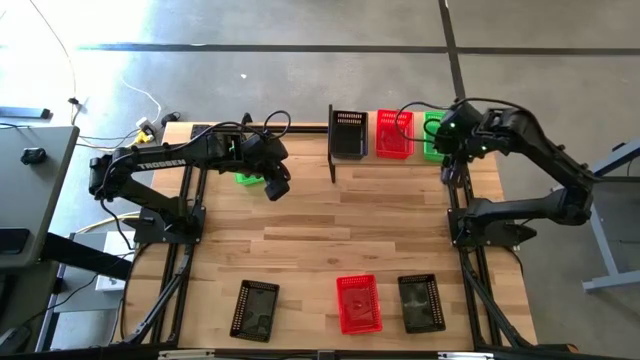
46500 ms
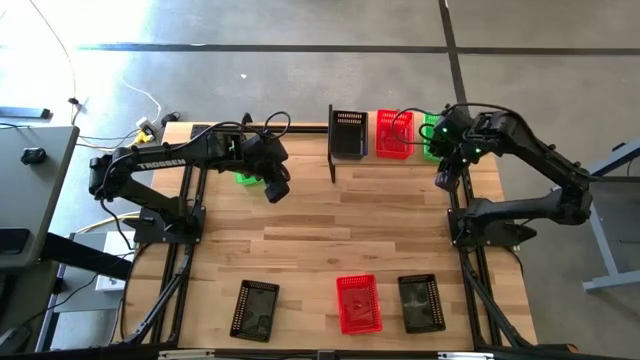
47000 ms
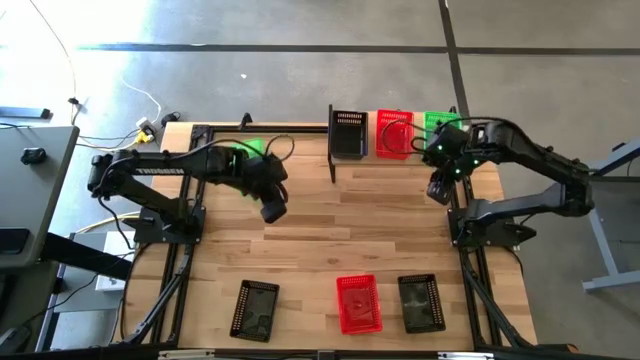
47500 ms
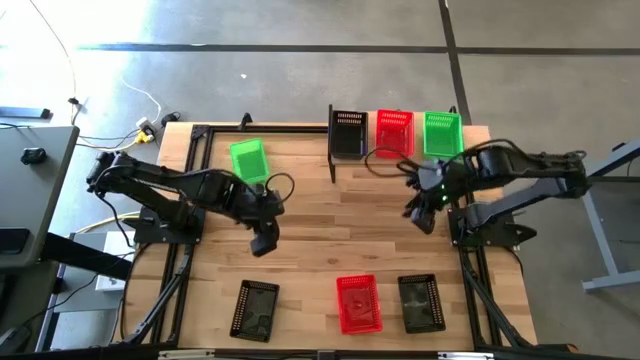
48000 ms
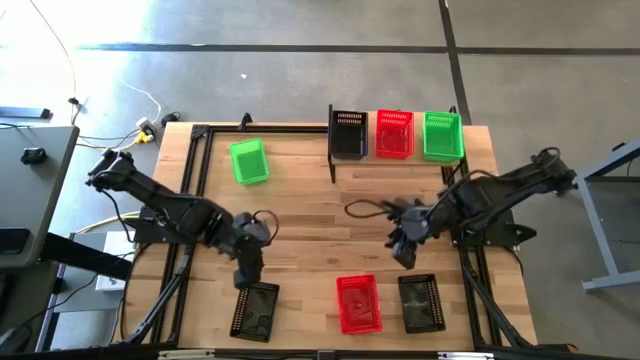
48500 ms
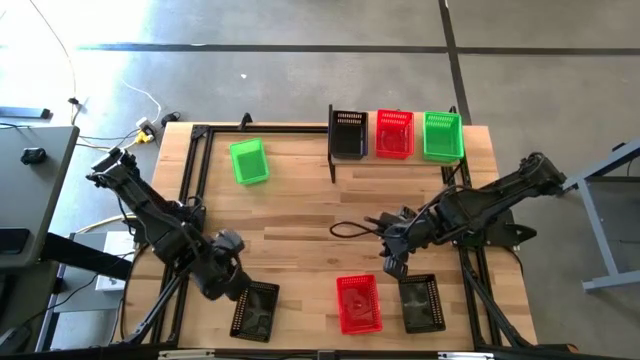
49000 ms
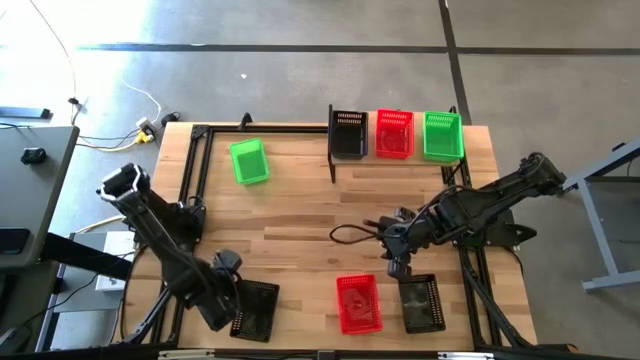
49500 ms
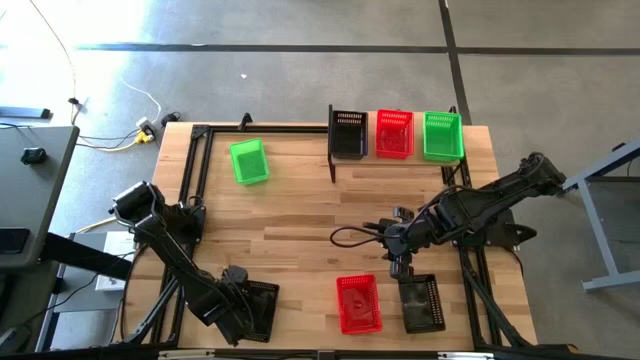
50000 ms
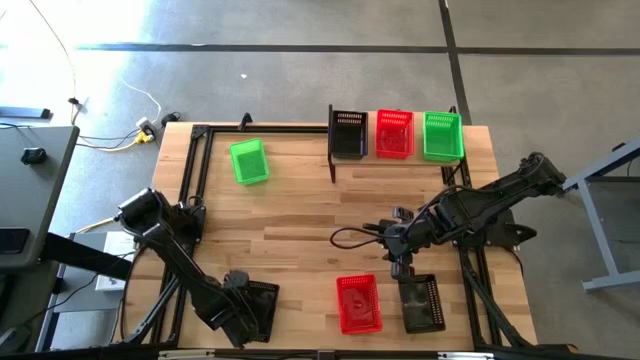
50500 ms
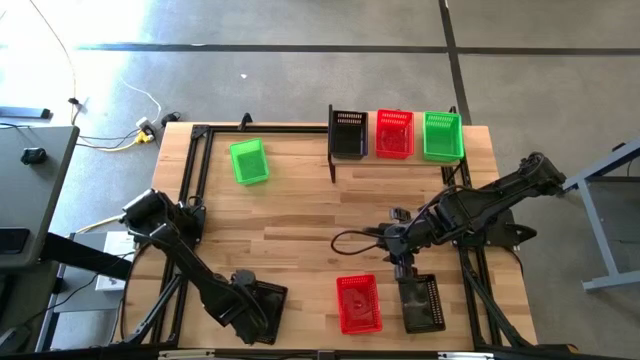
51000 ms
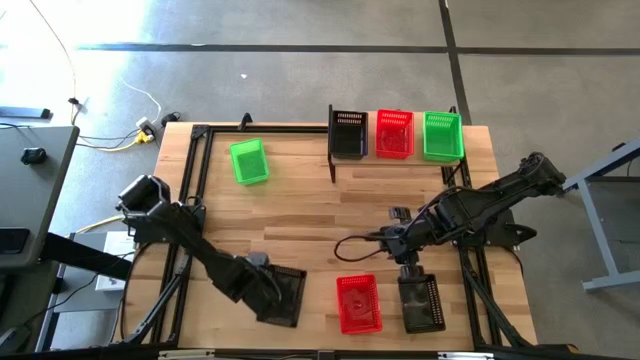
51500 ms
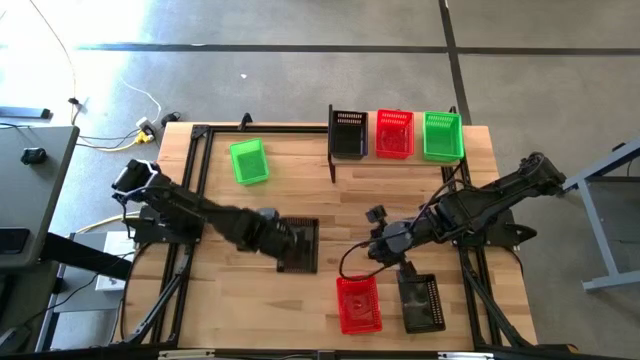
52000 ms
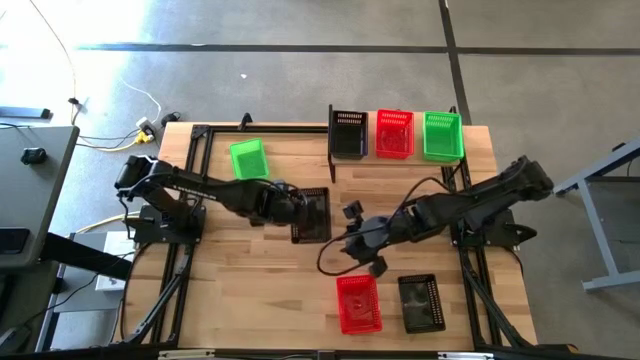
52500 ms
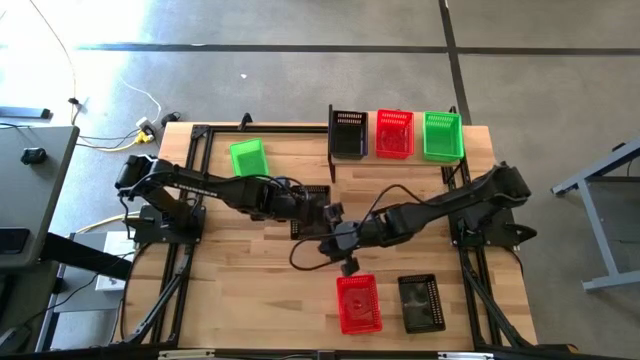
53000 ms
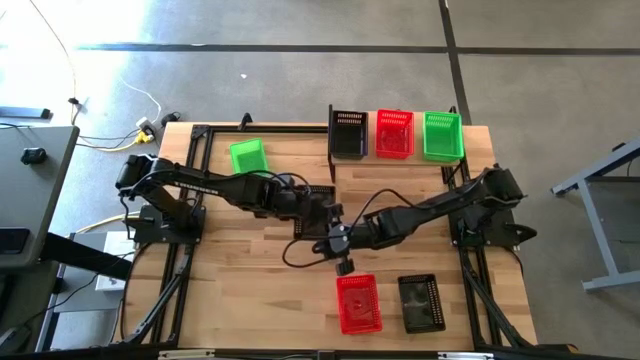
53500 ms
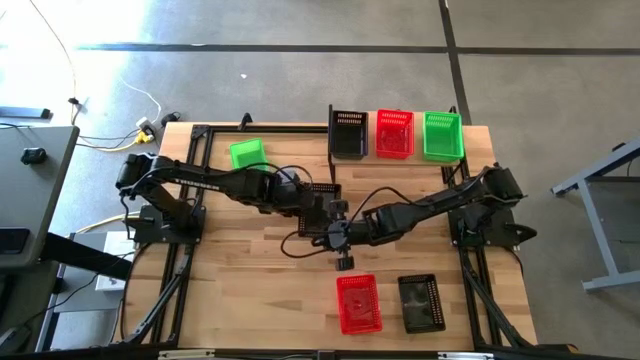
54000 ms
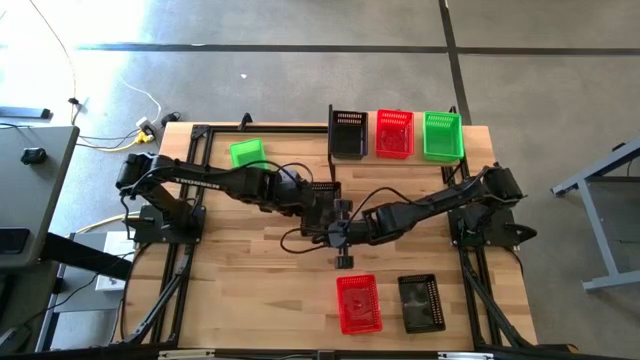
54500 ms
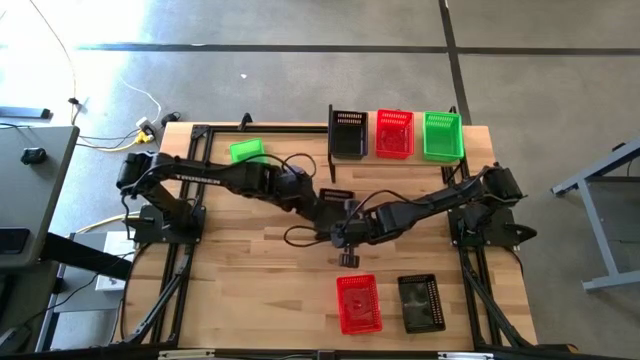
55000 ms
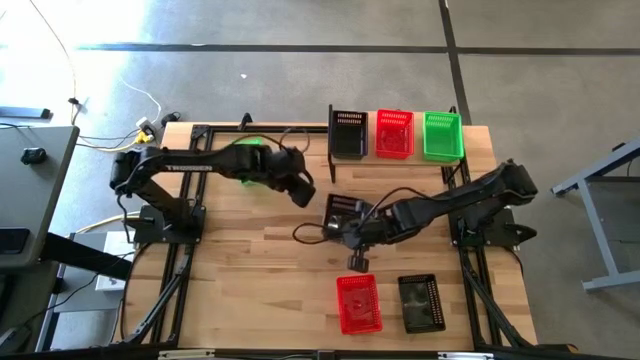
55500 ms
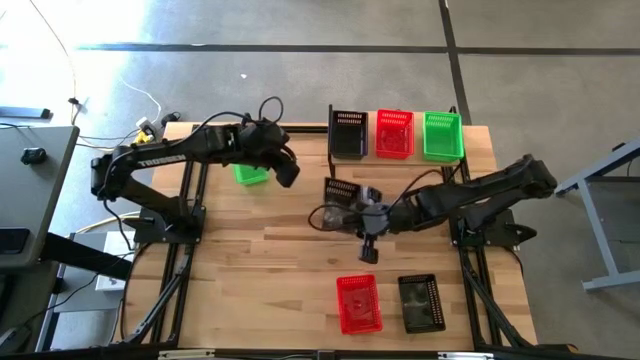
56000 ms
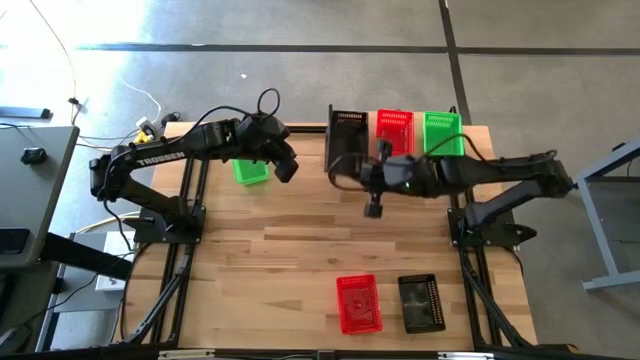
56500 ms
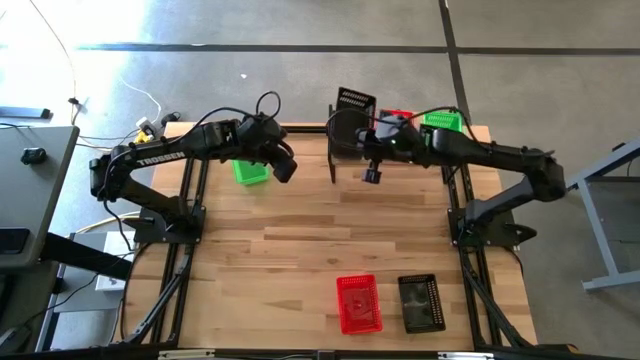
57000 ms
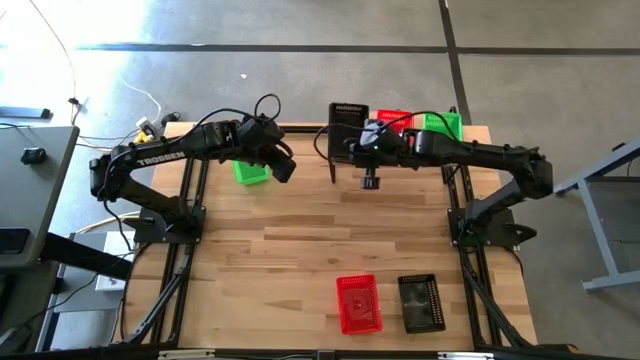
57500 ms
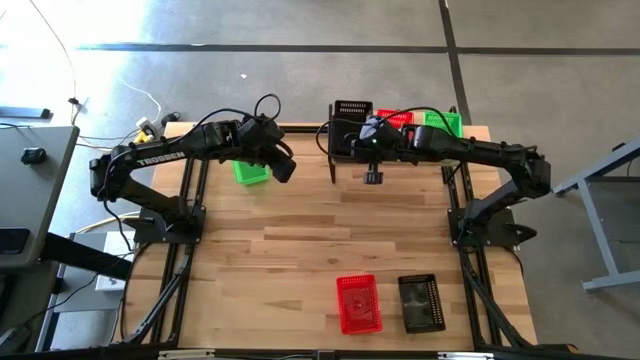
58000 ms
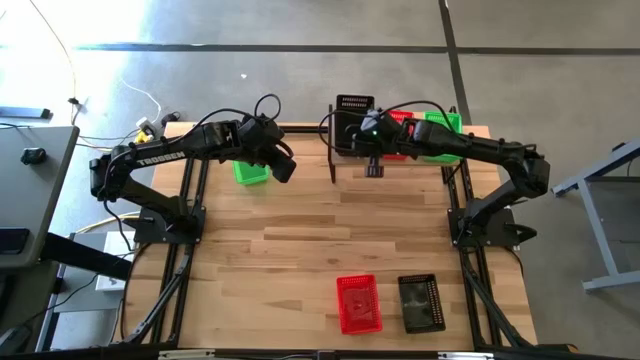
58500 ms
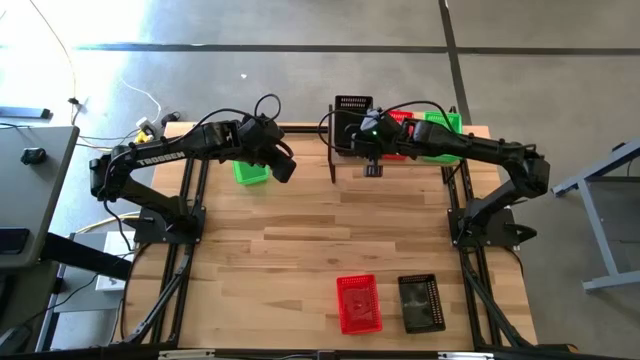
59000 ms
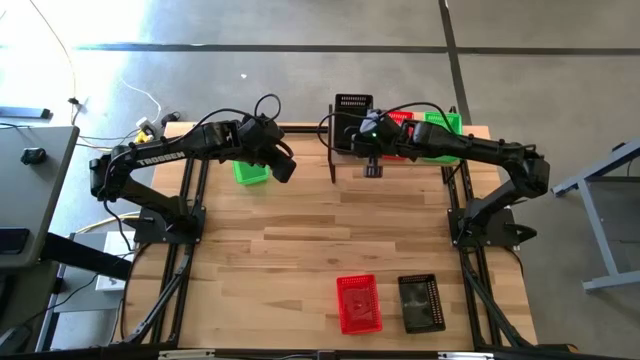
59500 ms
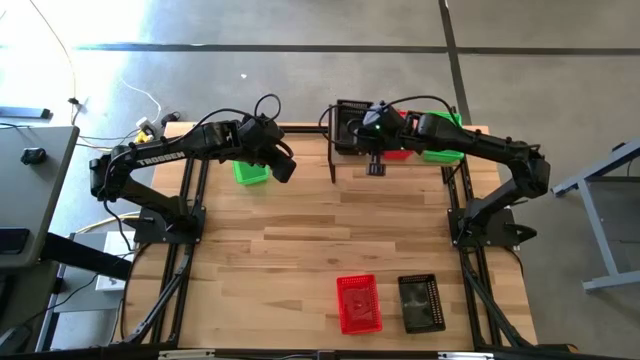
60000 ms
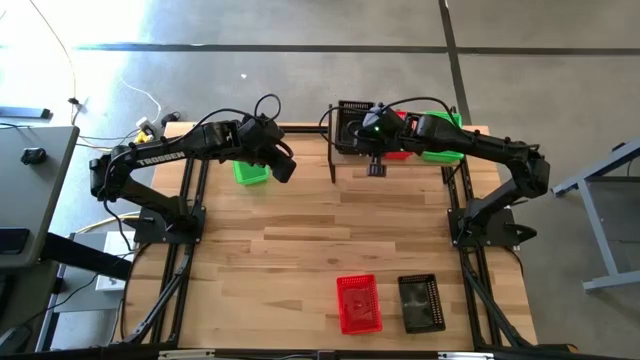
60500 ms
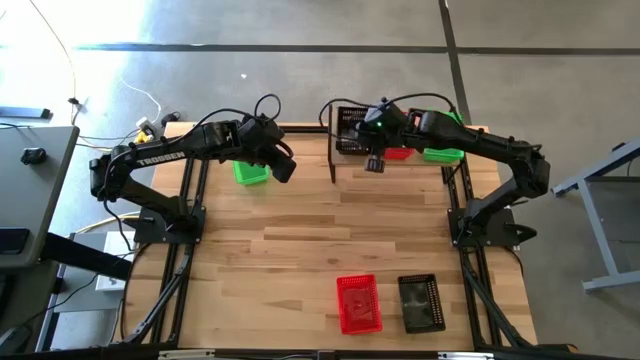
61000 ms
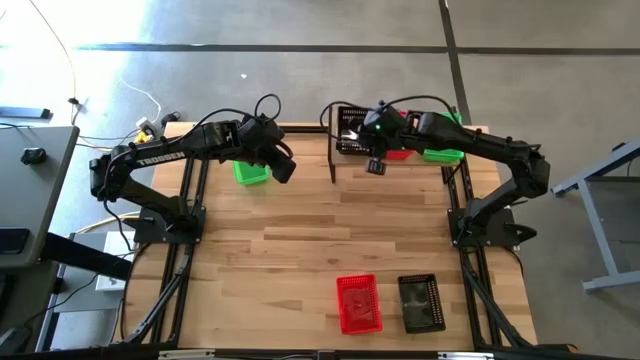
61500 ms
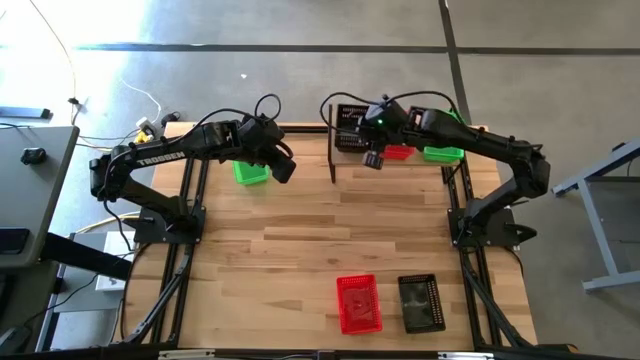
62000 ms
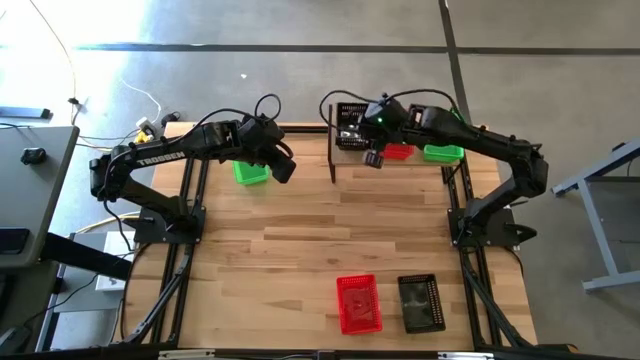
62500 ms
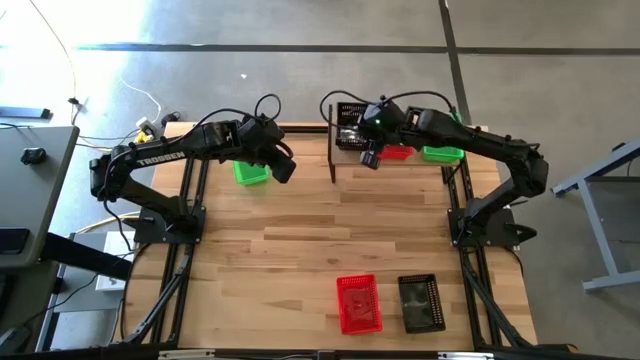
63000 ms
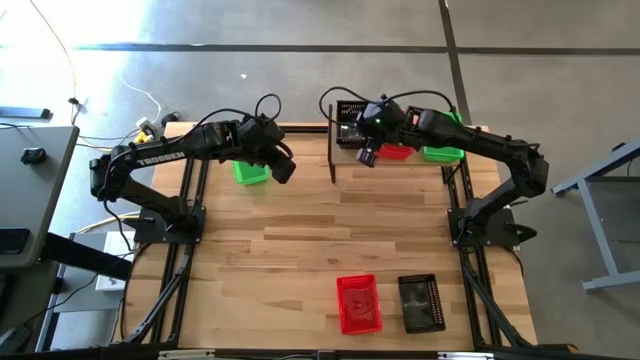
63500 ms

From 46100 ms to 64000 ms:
Task: Stack baskets on shelf by color
Stack the left black bin on top of the black bin on the shelf

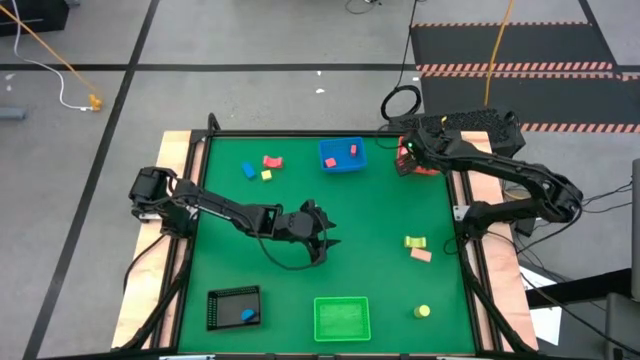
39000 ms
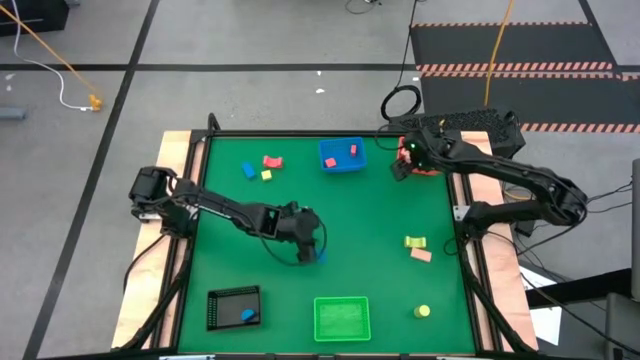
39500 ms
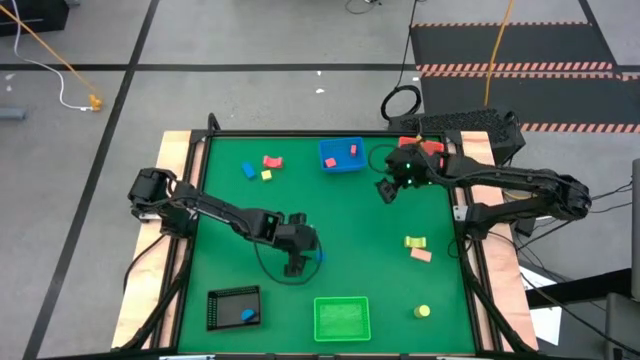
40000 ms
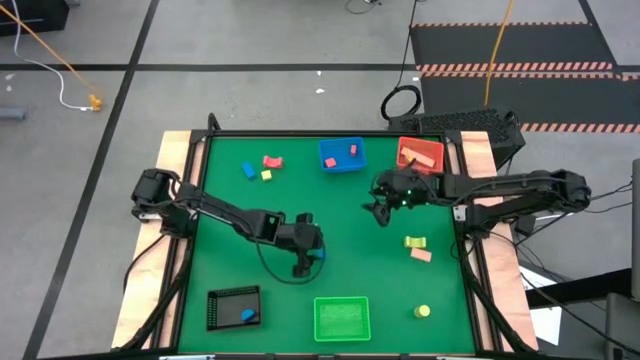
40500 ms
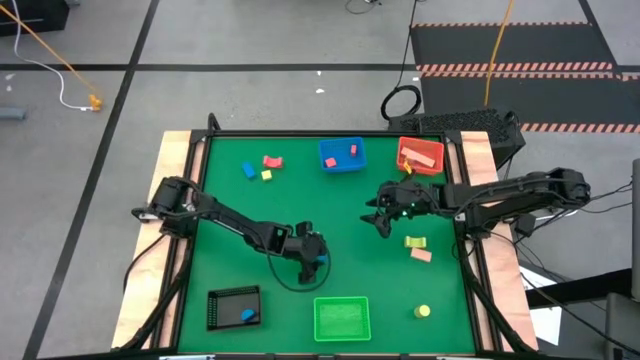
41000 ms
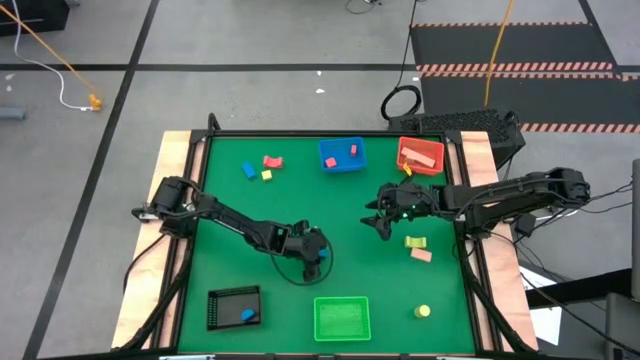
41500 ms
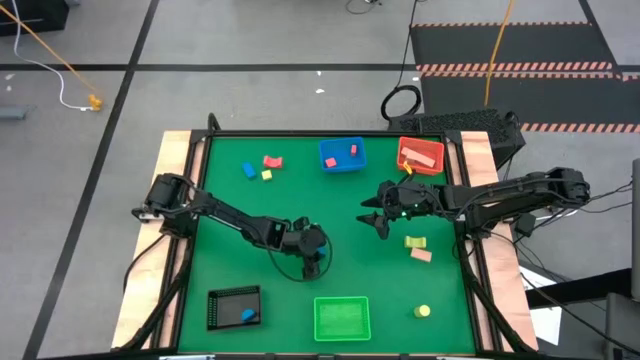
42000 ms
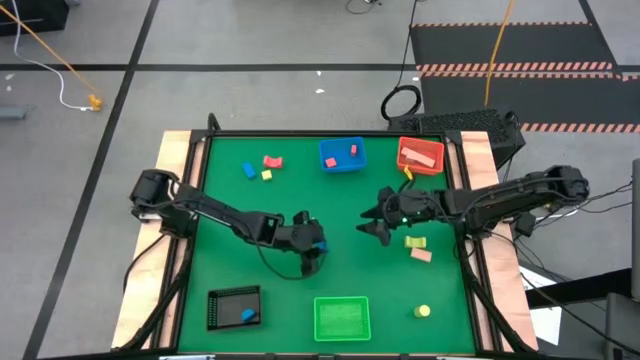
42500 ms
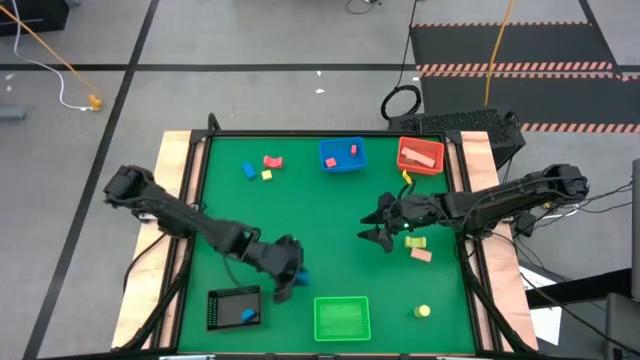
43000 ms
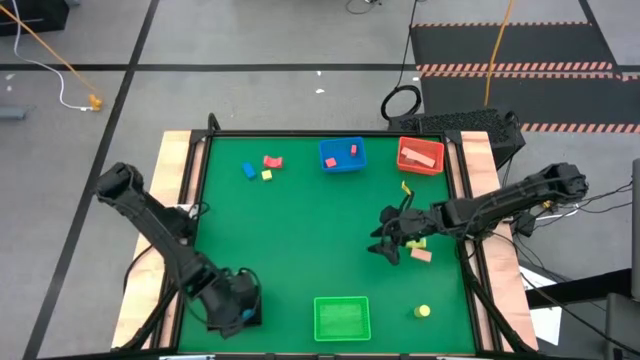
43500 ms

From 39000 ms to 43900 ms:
Task: Sort & place blocks by color
Put the blue block into the black bin
